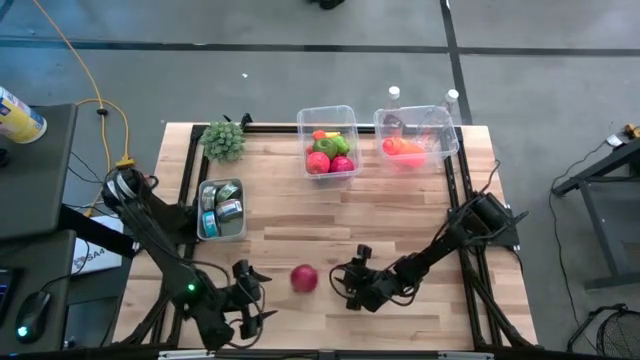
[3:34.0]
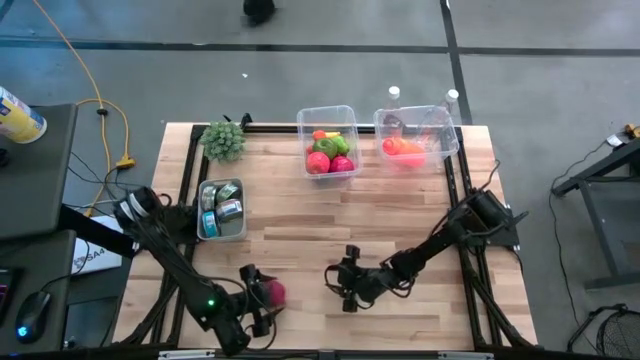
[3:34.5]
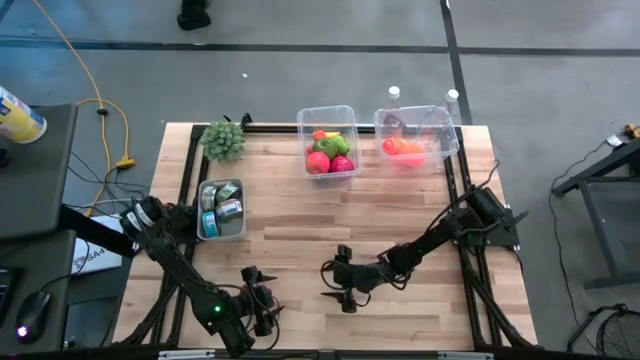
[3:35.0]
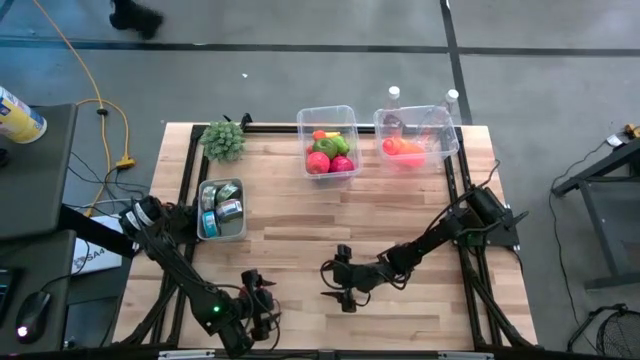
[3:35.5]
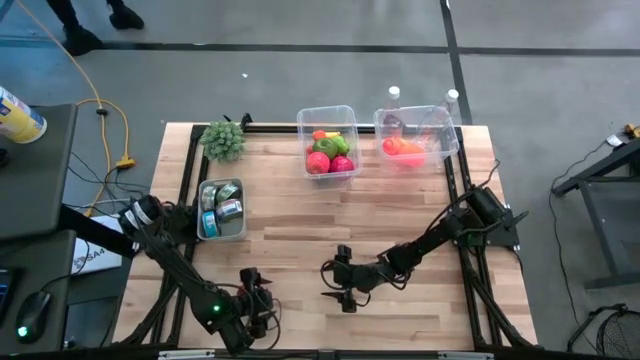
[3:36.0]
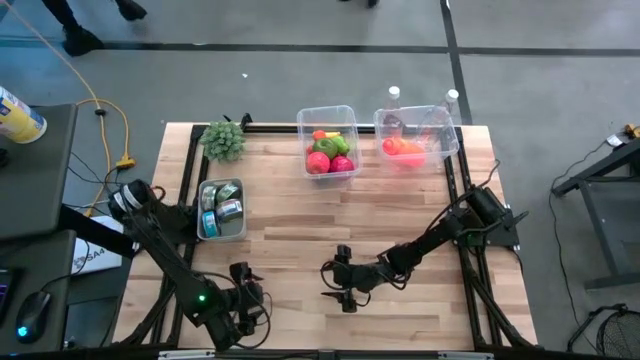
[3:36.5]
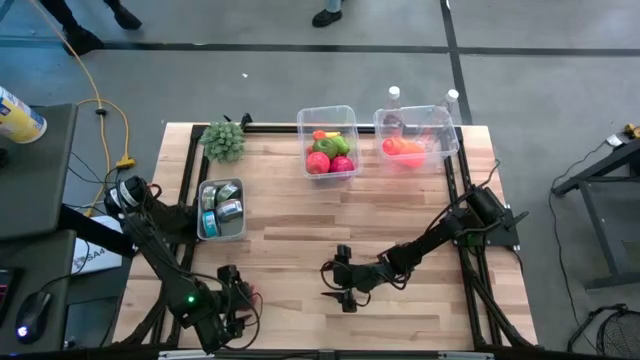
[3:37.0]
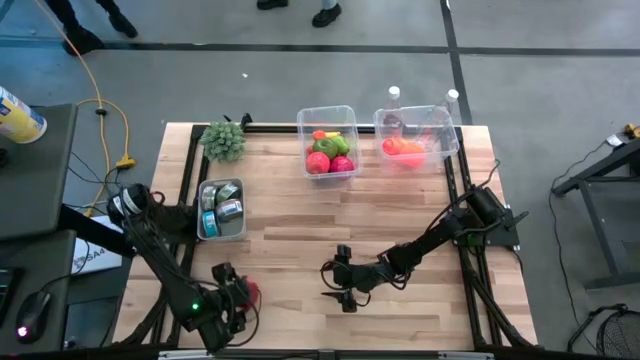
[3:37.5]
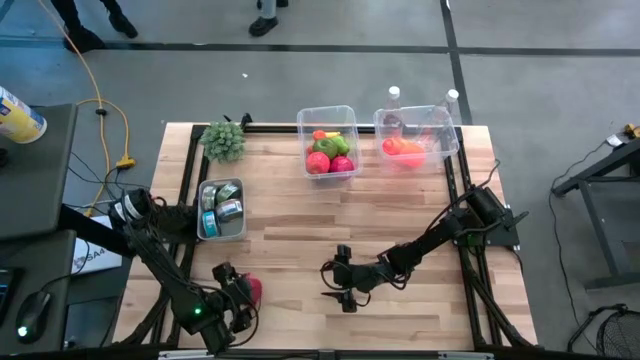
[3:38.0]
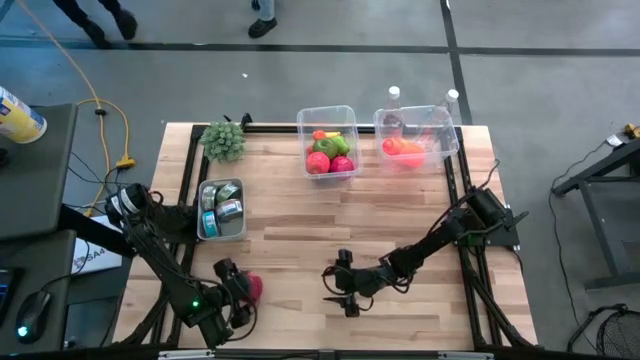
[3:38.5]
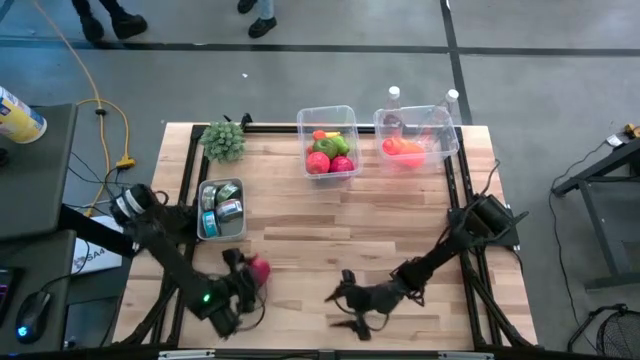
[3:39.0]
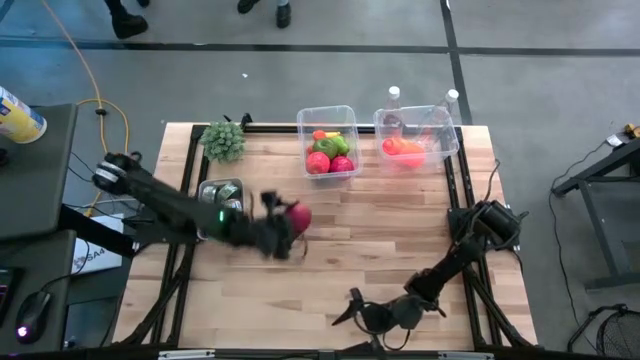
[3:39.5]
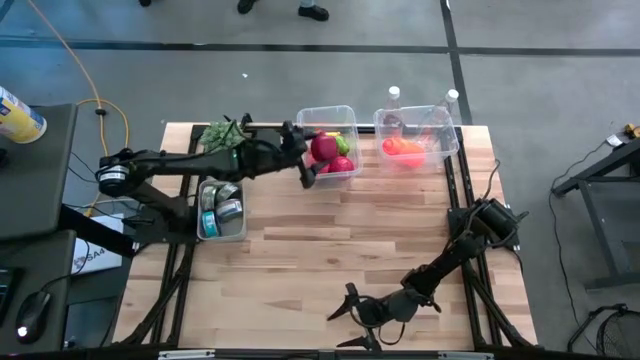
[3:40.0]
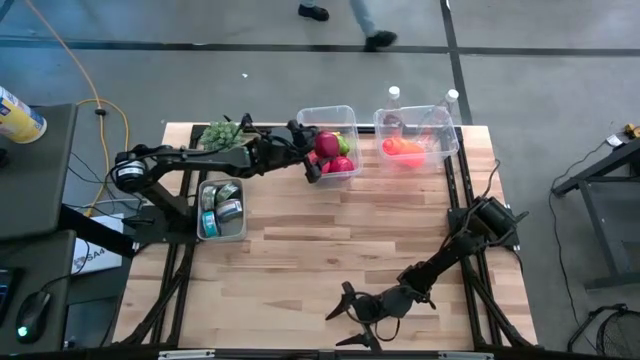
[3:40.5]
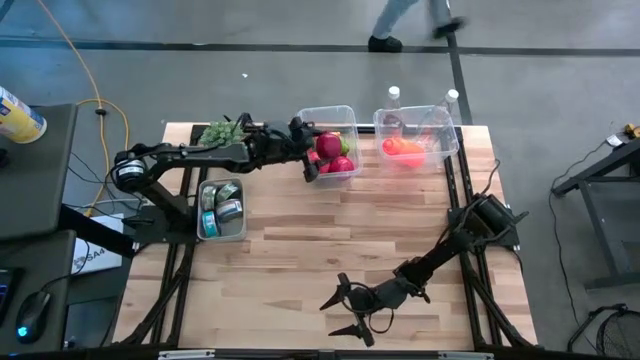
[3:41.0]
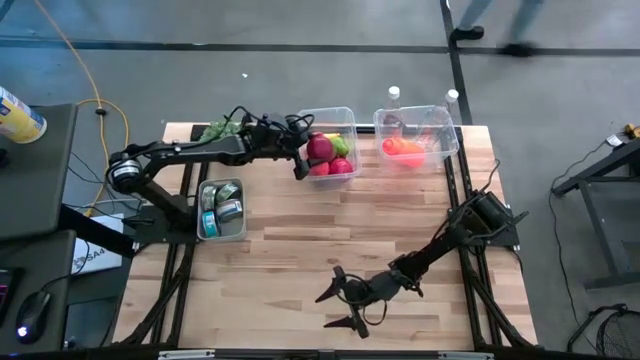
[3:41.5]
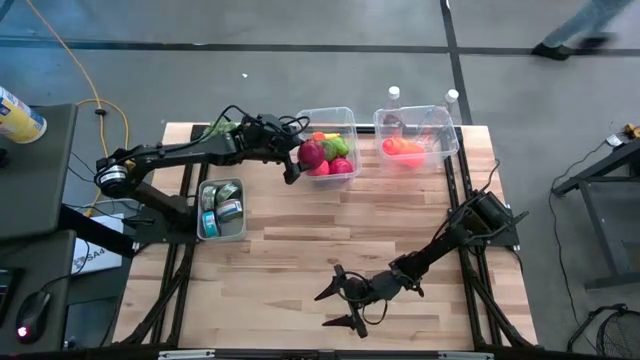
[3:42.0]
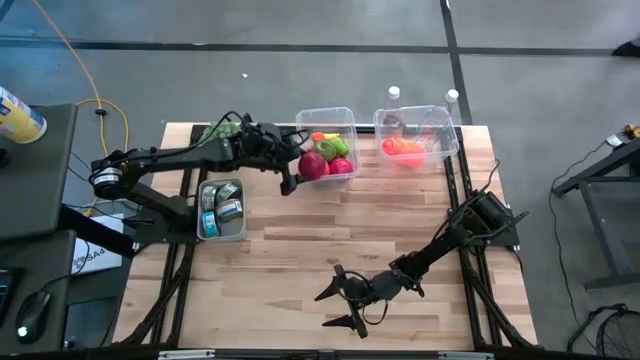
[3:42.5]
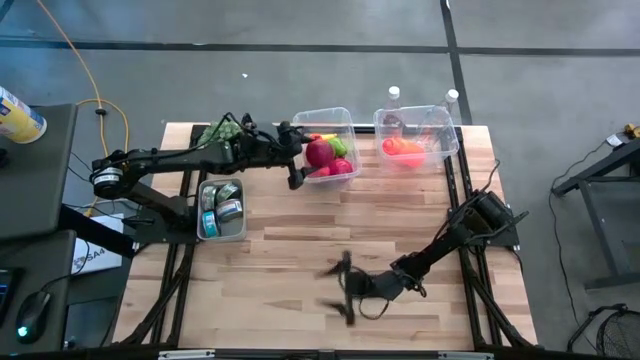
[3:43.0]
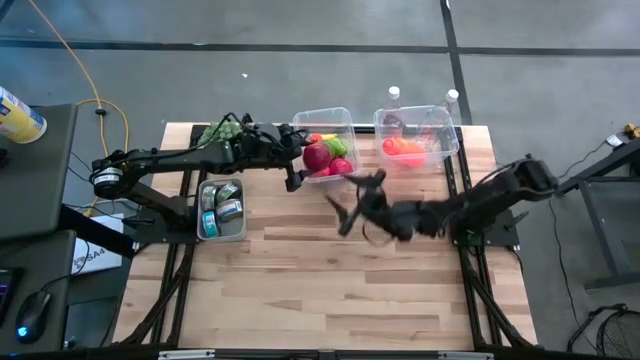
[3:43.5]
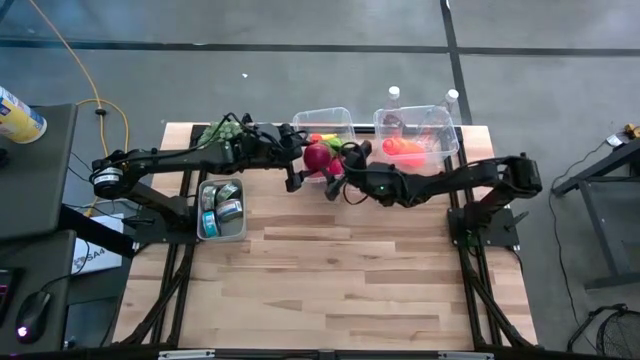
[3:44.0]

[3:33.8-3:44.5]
Task: Pick & Place Food Item
Put the pomegranate into the left transparent bin

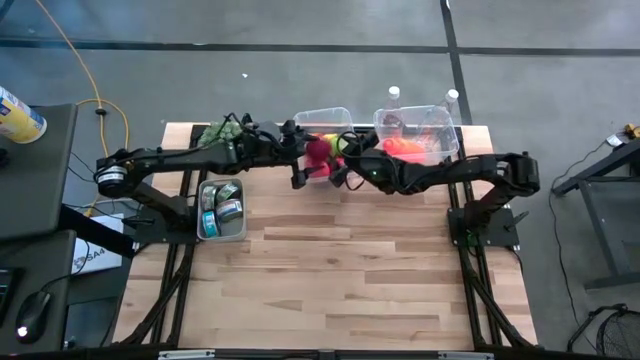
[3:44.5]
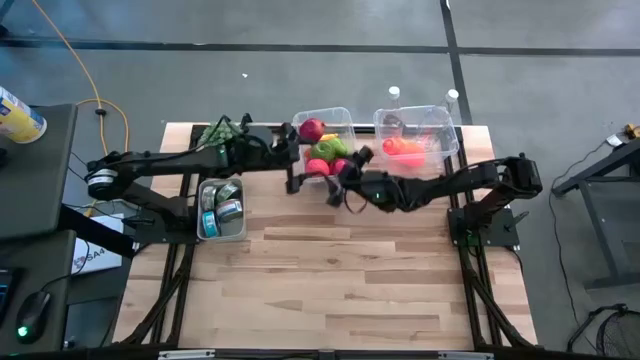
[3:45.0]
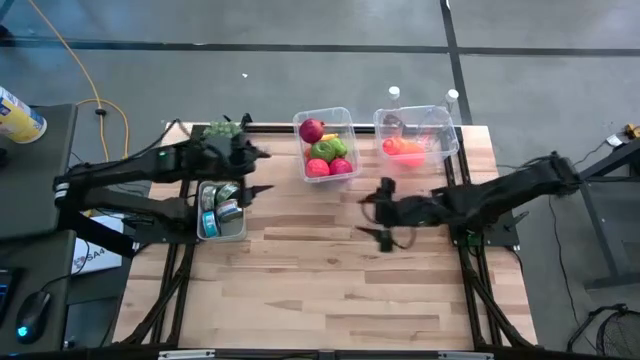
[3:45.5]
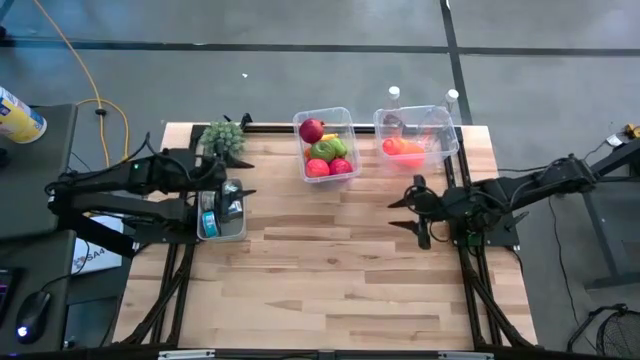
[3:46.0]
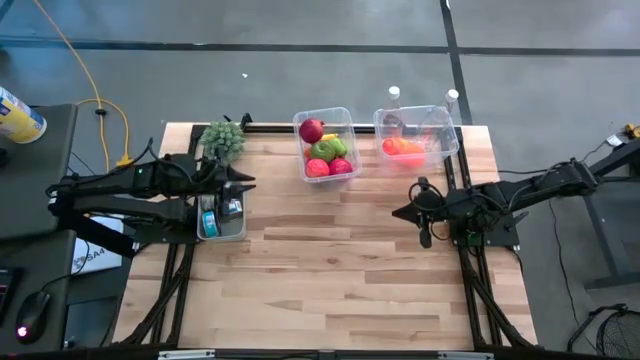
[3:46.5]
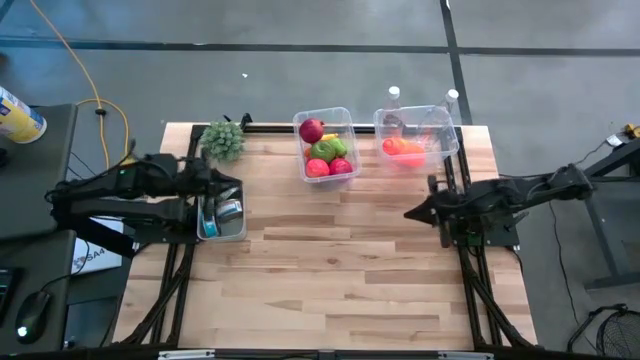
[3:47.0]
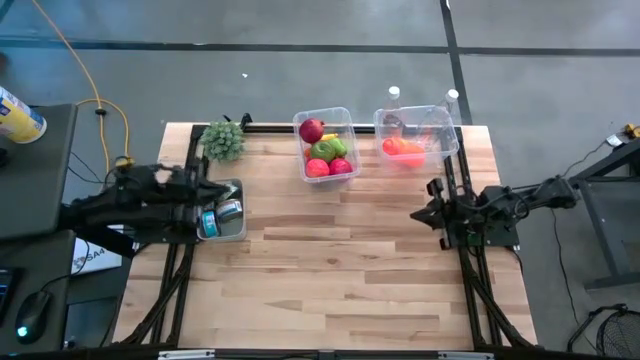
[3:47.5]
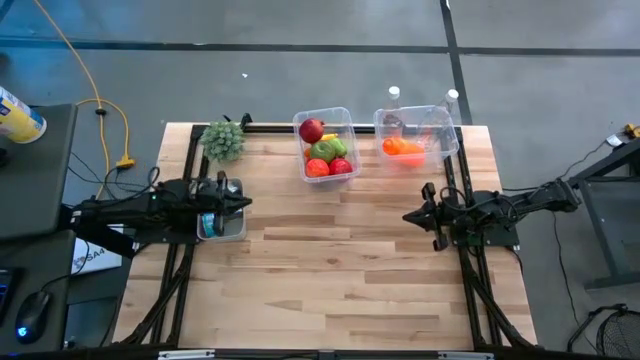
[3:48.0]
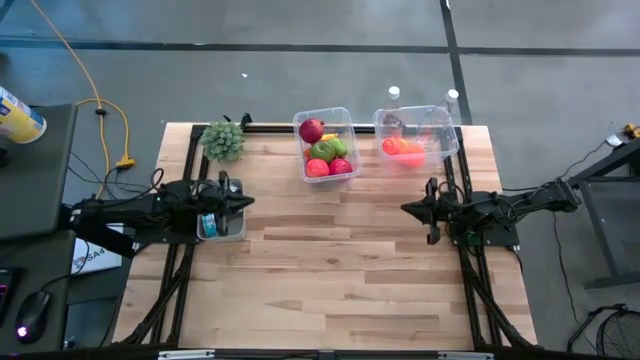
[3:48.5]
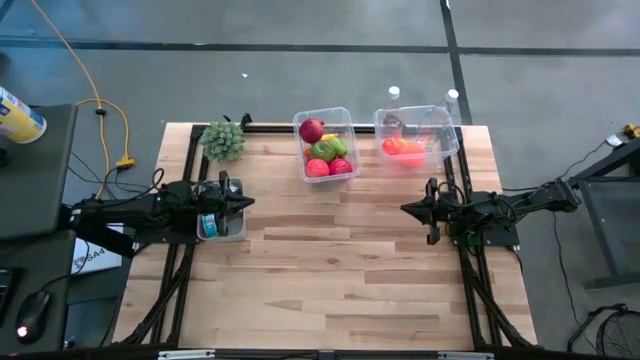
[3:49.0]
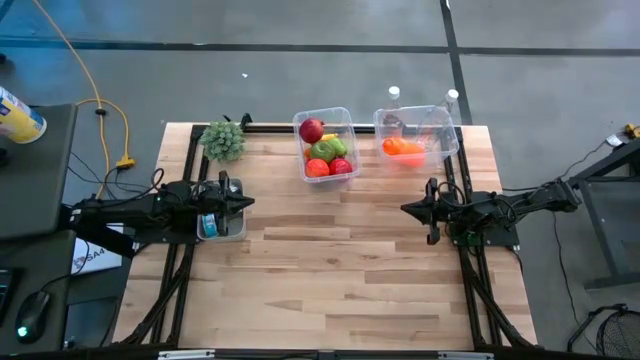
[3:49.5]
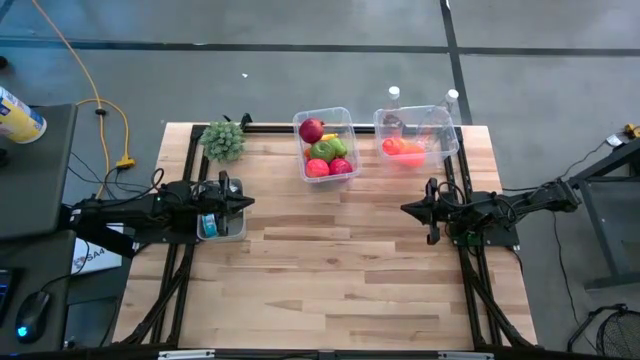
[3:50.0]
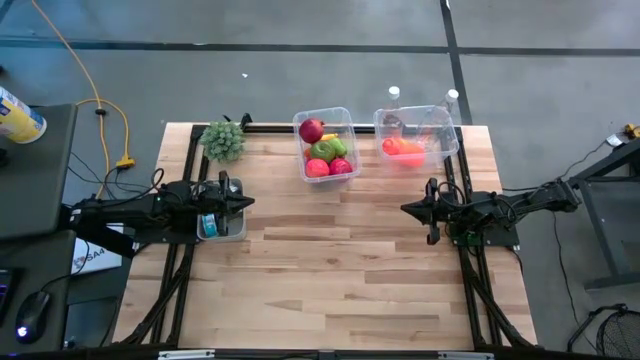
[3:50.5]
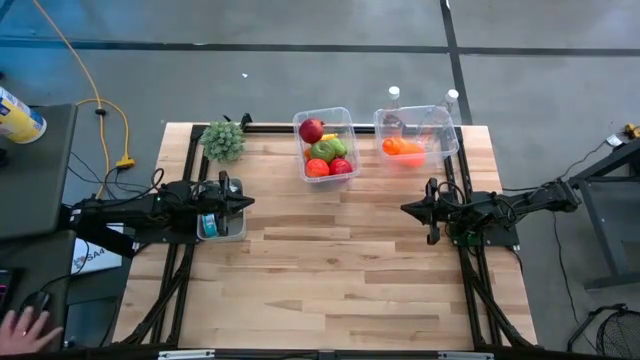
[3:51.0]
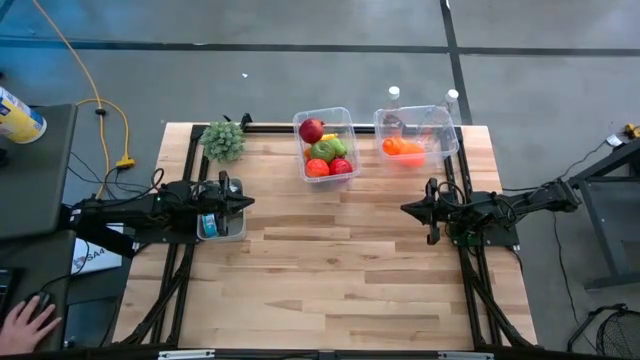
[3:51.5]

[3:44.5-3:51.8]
Return to Home Position

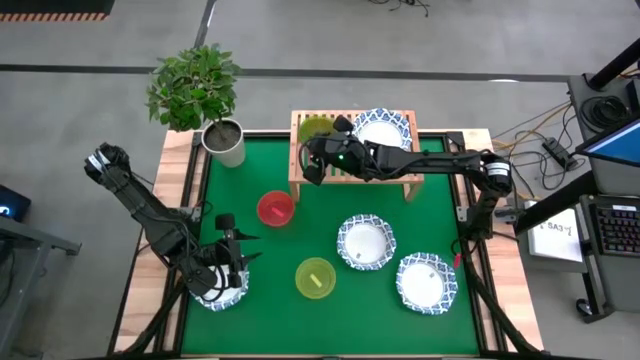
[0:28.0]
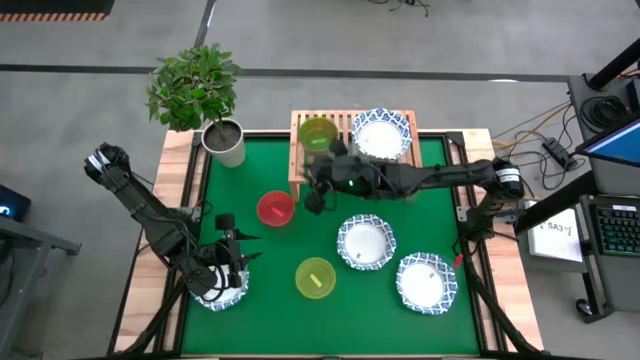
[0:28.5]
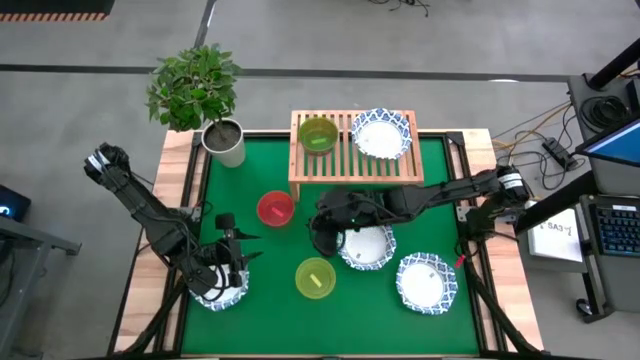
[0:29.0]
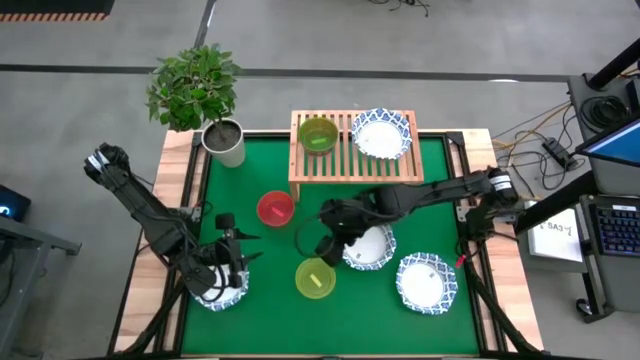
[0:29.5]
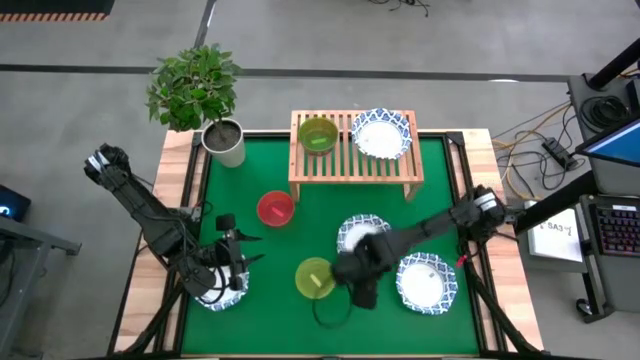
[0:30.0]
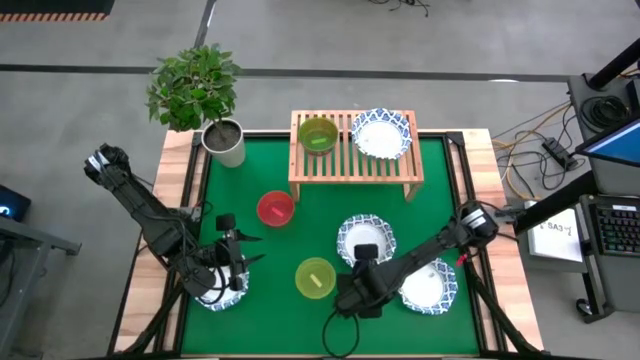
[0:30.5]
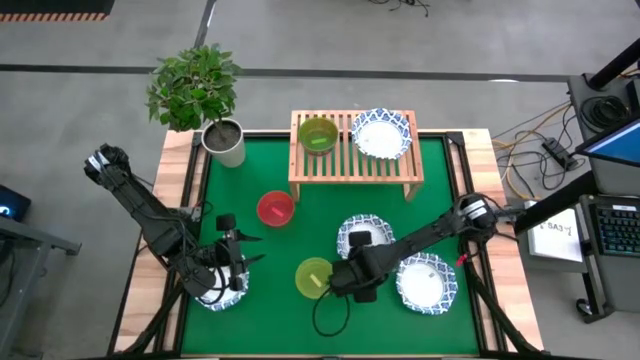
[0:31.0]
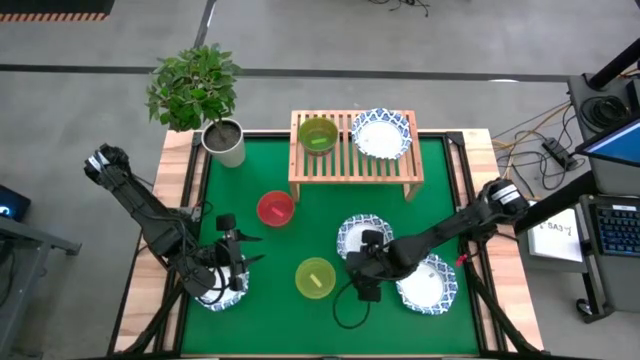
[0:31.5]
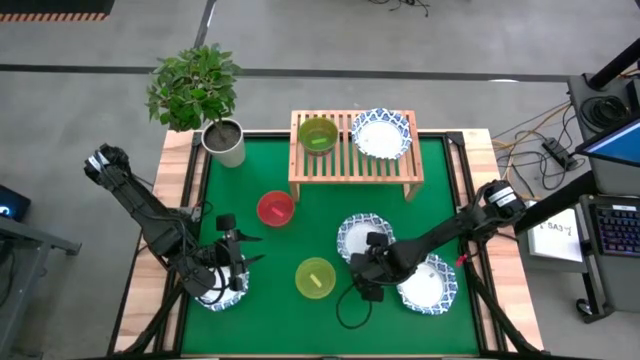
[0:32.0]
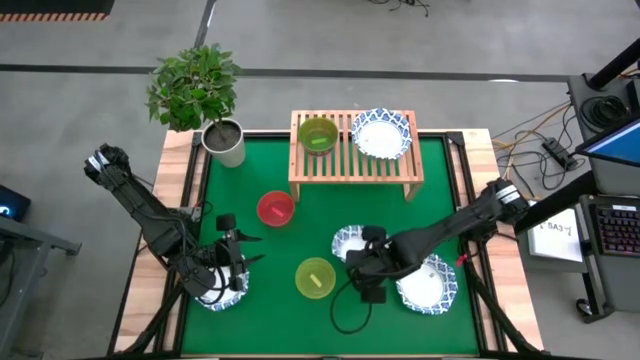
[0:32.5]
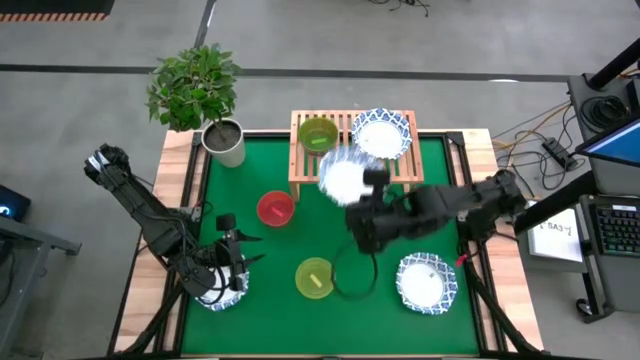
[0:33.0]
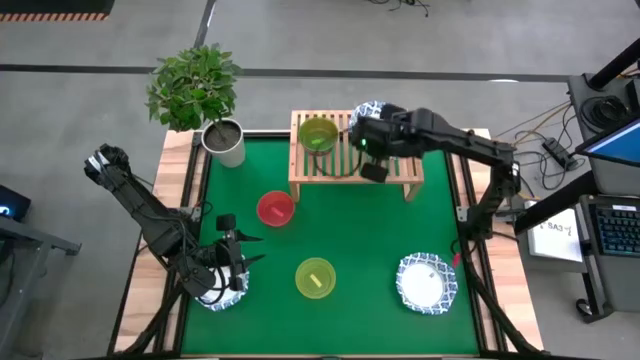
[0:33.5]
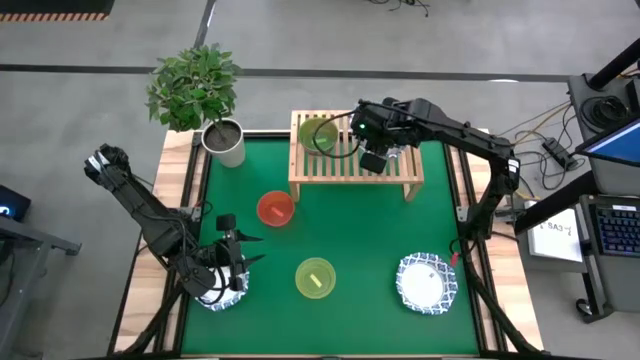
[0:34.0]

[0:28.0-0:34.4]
Task: Place and stack bowls onto a shelf
Stack the top middle white patterned bowl on top of the white patterned bowl on the shelf
